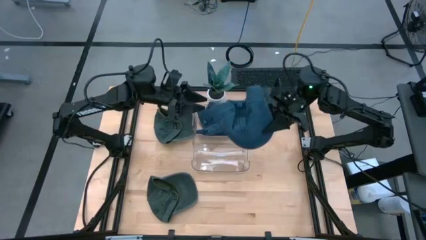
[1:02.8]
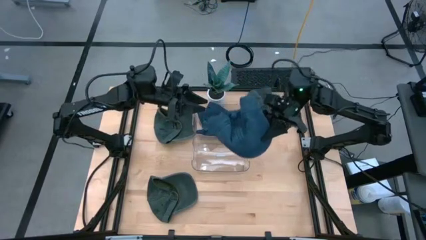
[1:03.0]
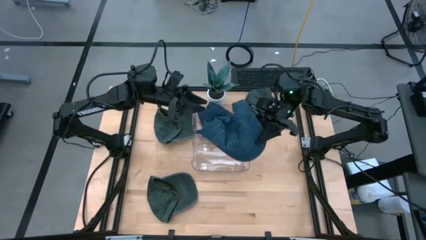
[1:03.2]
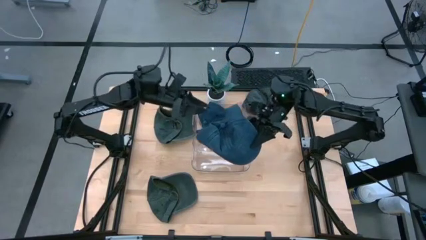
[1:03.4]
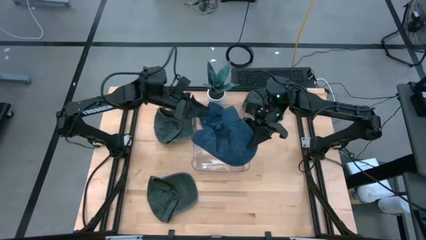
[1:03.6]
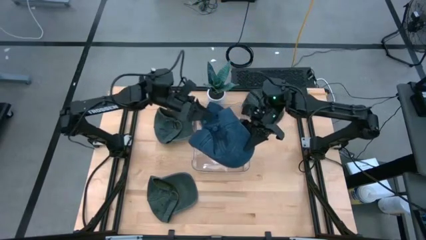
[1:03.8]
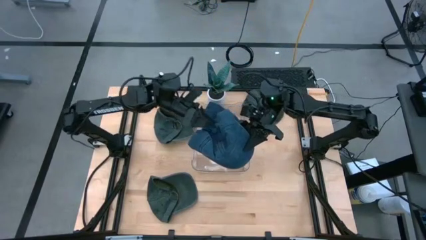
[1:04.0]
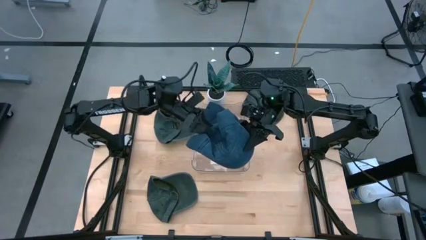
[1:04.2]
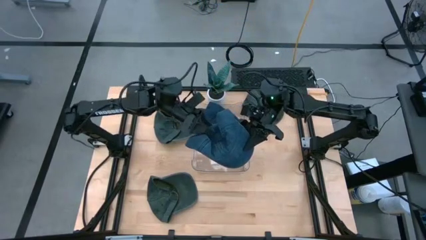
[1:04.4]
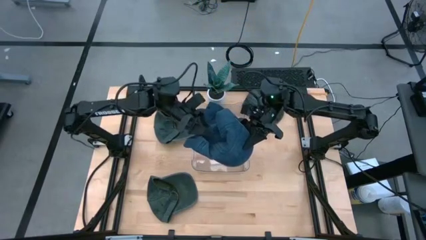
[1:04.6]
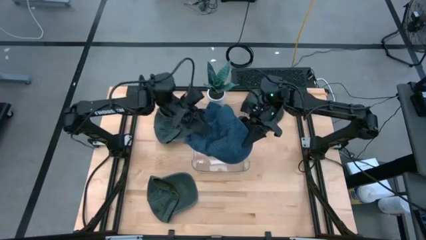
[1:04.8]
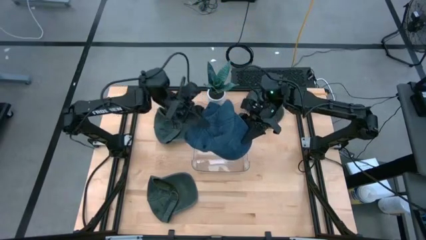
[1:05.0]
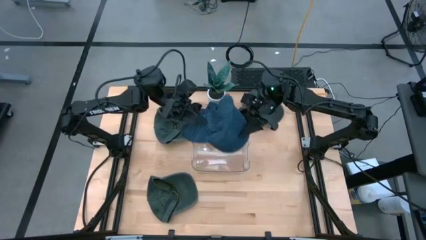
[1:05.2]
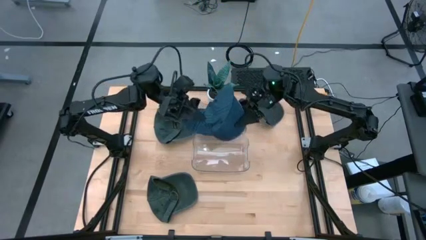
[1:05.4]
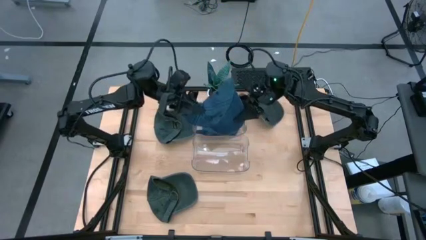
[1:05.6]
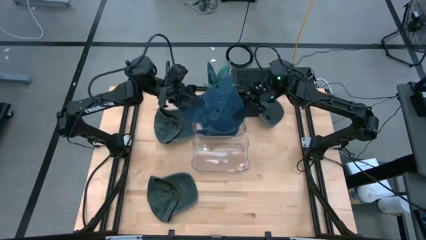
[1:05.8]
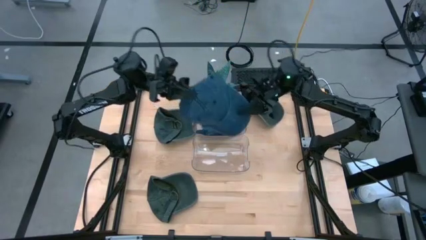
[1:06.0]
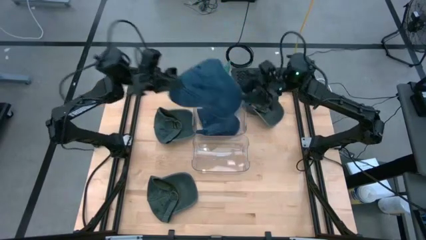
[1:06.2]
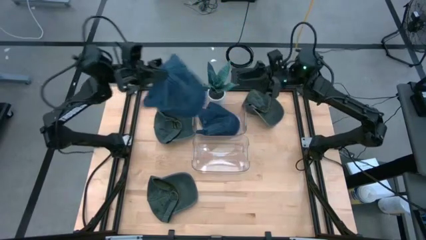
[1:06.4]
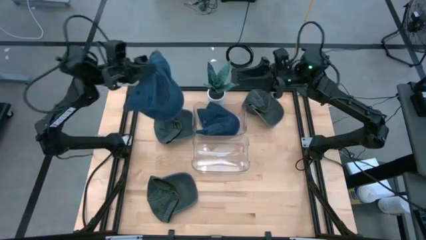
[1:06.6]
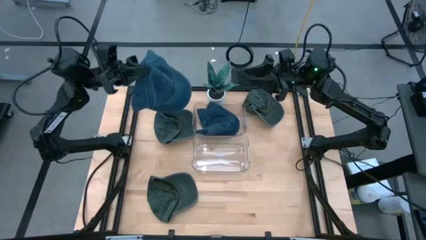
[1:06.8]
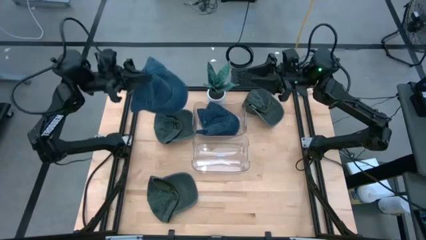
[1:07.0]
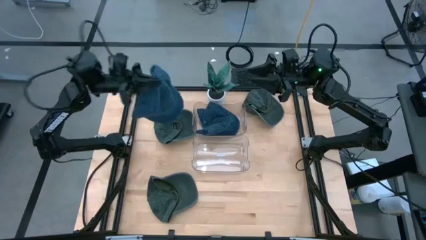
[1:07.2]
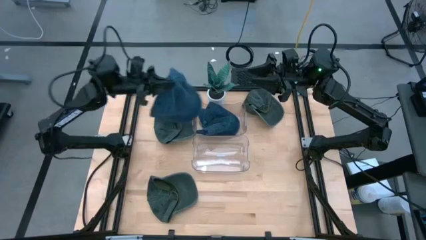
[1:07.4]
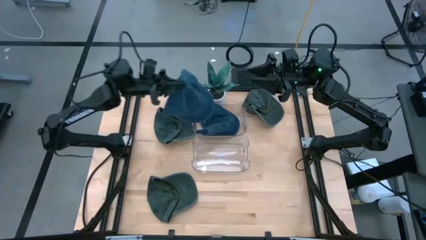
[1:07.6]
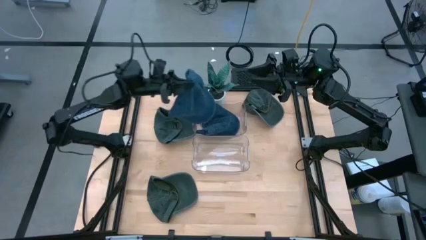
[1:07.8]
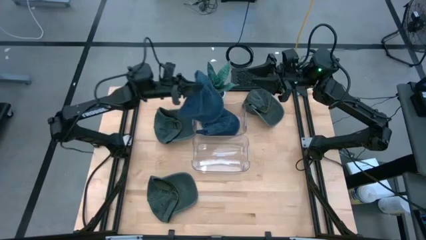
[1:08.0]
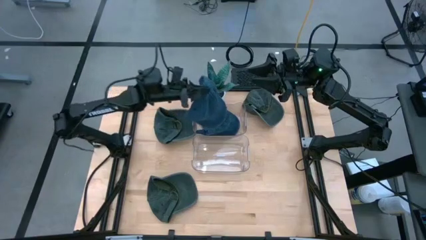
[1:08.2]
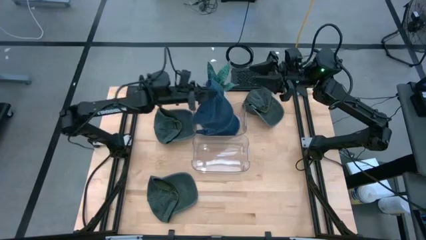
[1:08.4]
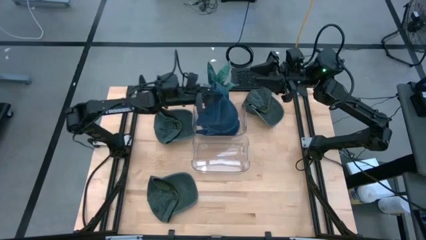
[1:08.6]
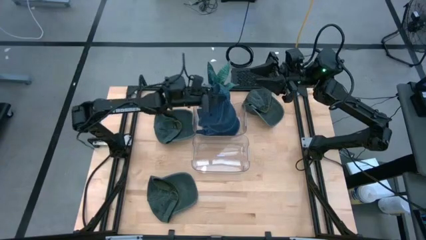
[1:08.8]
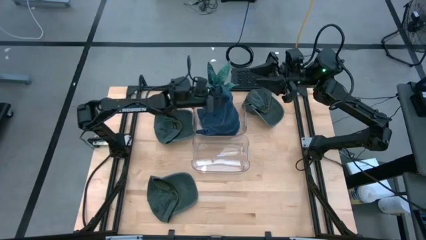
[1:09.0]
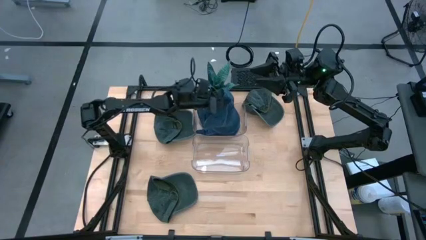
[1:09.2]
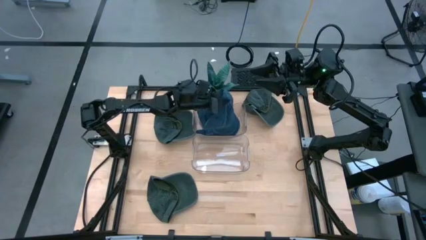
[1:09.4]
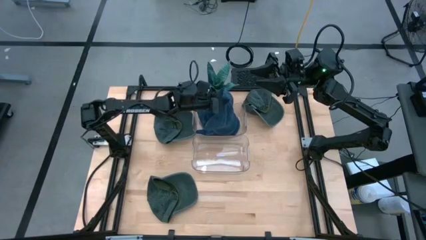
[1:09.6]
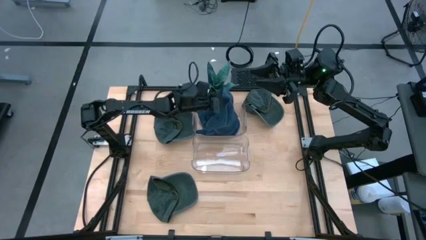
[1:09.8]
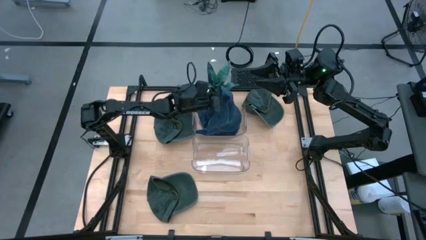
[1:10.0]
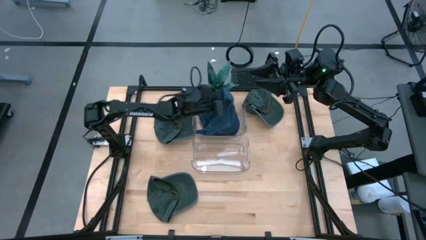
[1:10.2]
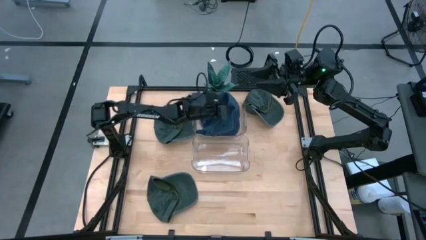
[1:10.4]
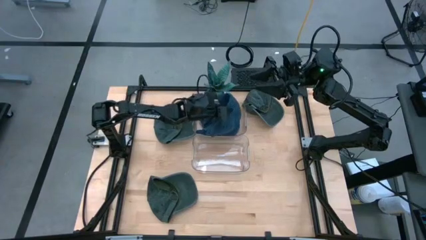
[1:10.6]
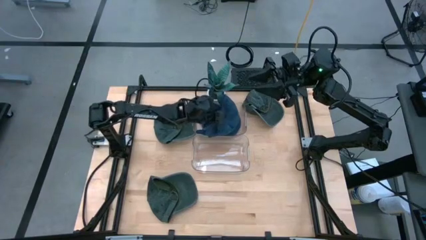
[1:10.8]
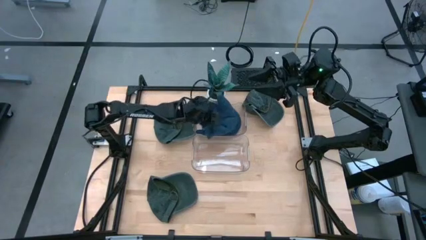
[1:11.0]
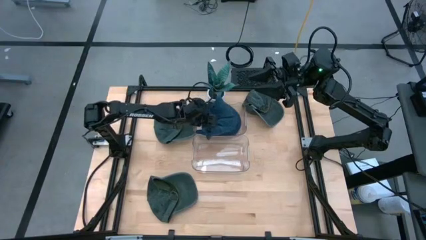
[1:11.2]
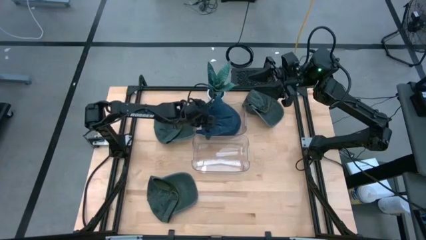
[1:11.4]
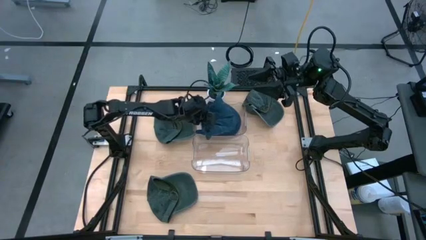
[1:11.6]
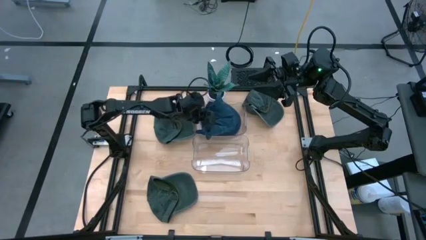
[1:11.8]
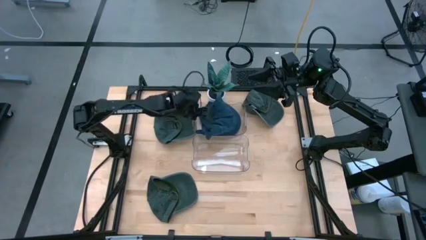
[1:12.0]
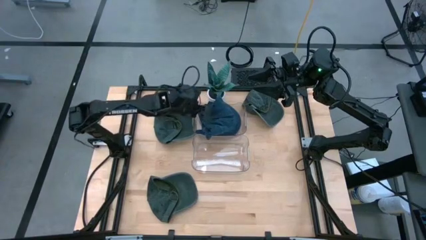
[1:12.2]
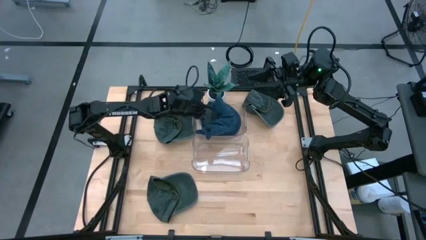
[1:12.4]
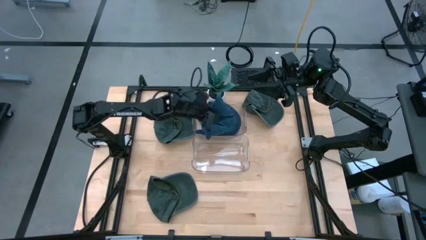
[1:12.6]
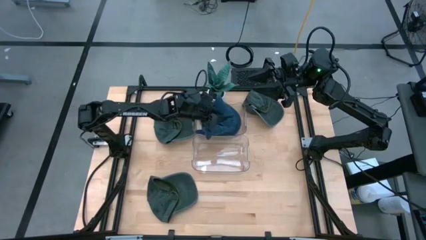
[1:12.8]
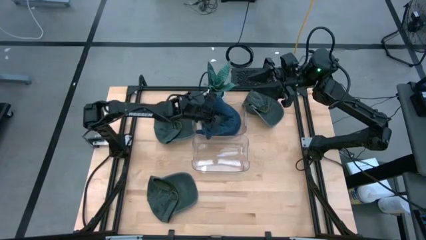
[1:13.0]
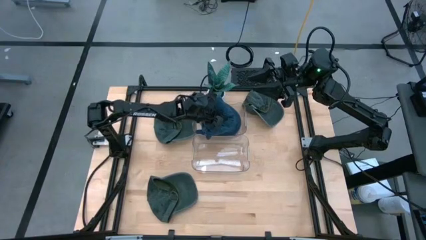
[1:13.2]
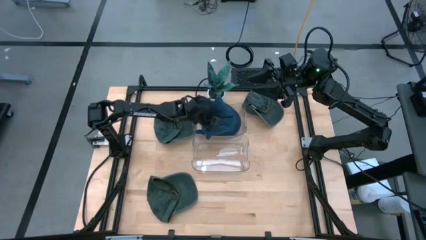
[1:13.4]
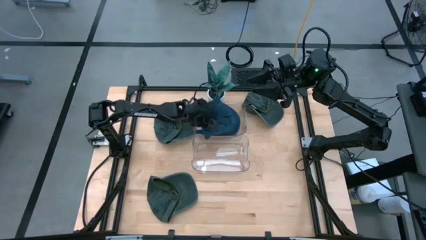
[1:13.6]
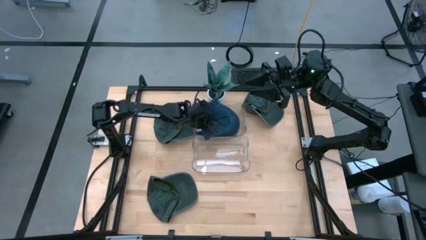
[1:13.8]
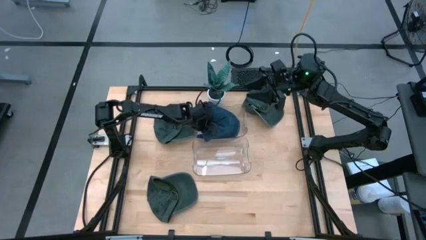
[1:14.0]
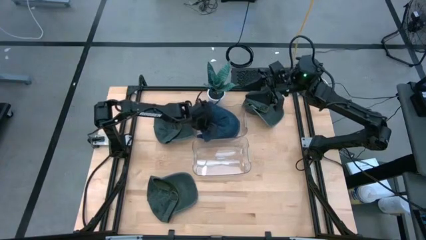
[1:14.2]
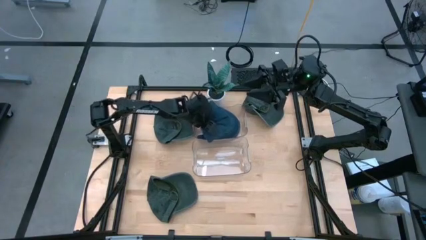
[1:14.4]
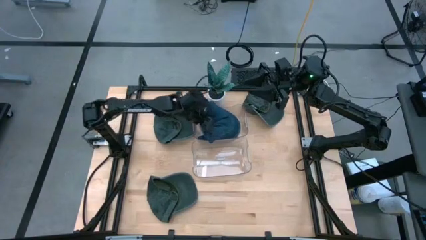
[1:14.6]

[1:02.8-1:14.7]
Task: Pick & Place hat
Put the blue cap into the top transparent bin

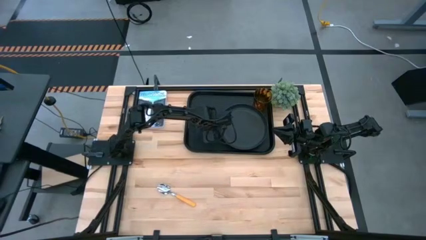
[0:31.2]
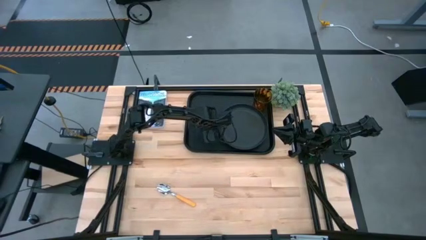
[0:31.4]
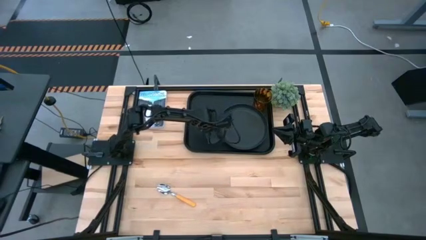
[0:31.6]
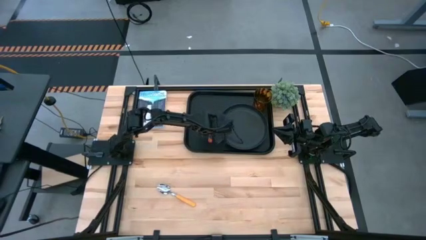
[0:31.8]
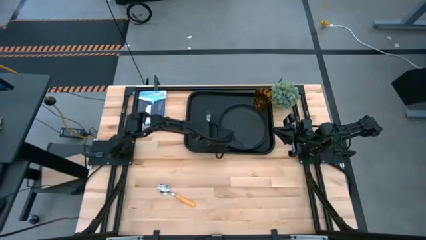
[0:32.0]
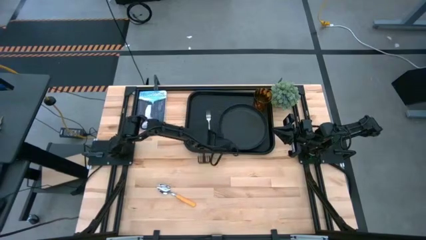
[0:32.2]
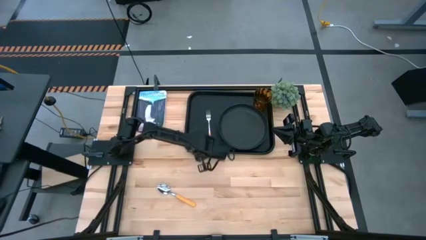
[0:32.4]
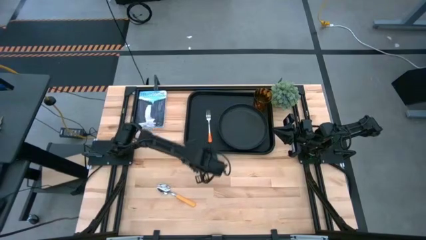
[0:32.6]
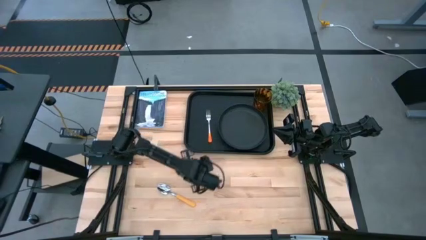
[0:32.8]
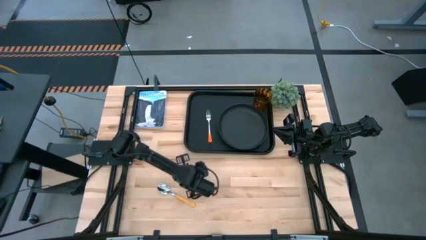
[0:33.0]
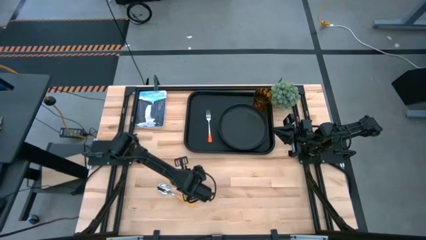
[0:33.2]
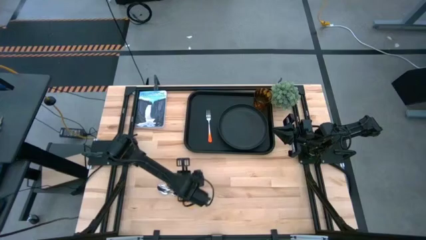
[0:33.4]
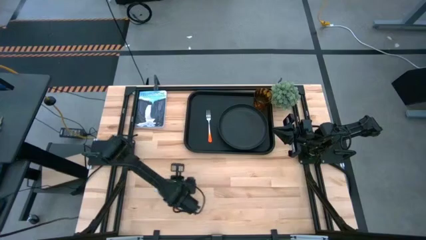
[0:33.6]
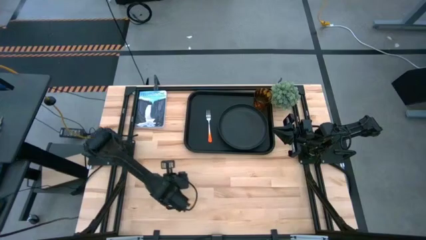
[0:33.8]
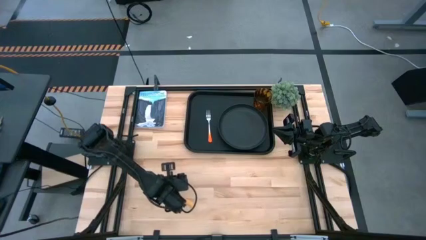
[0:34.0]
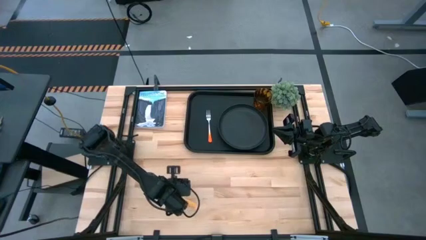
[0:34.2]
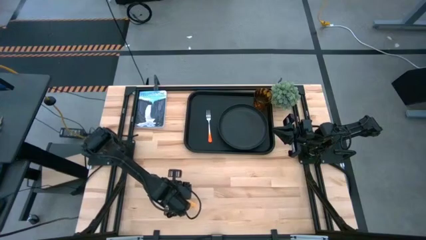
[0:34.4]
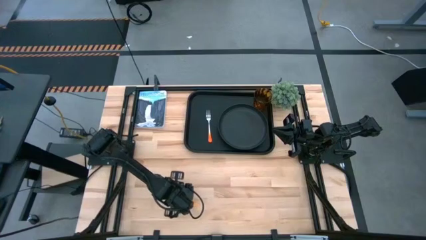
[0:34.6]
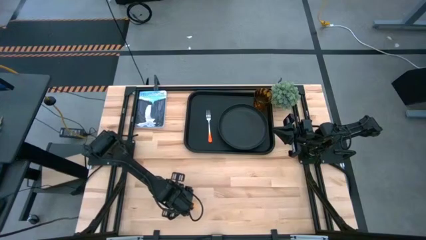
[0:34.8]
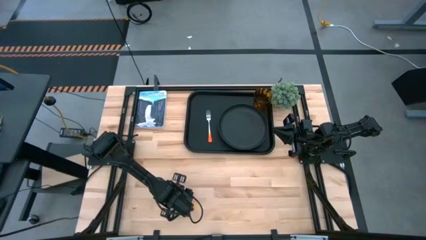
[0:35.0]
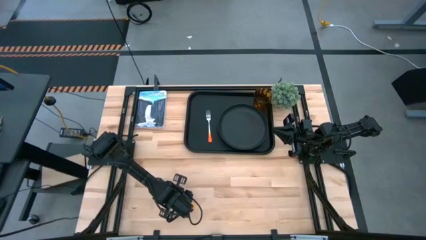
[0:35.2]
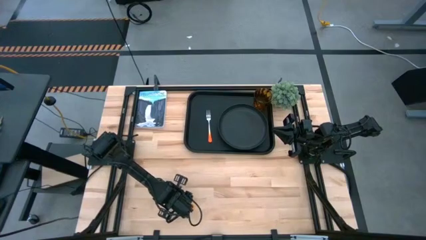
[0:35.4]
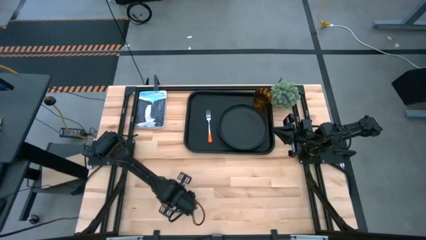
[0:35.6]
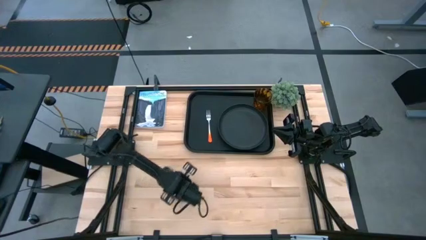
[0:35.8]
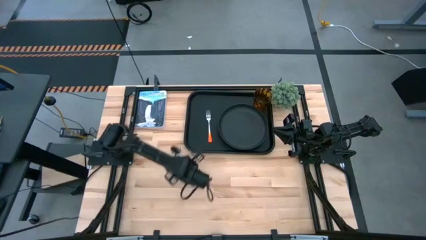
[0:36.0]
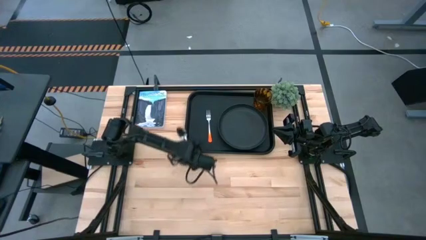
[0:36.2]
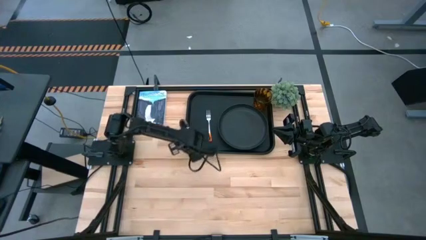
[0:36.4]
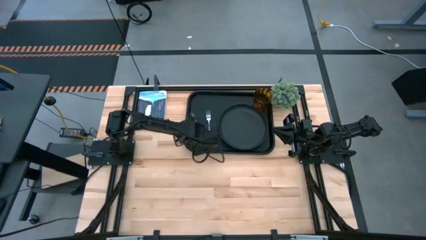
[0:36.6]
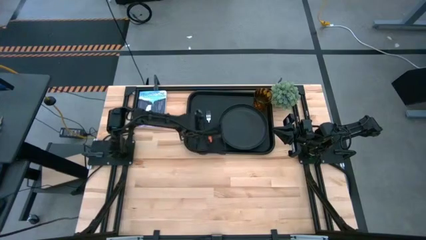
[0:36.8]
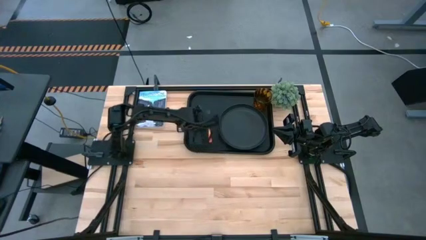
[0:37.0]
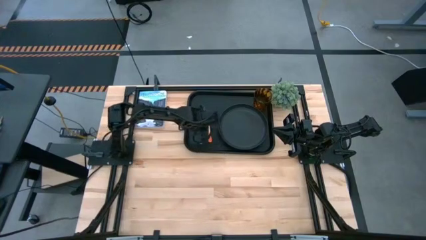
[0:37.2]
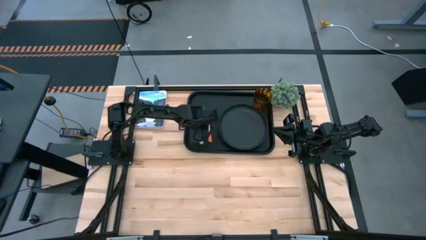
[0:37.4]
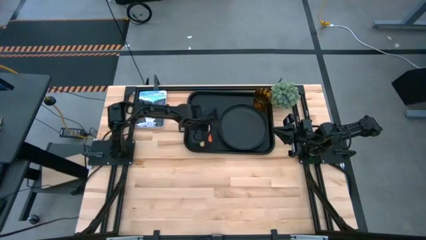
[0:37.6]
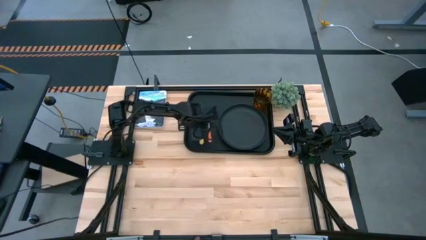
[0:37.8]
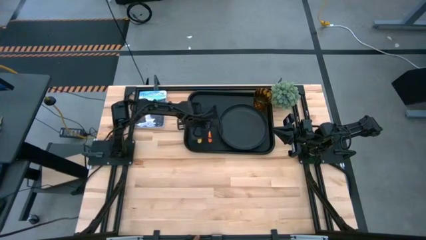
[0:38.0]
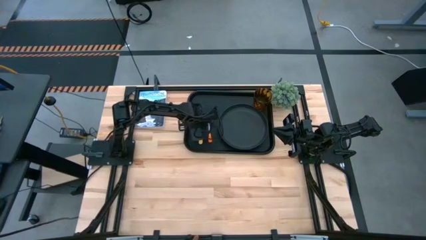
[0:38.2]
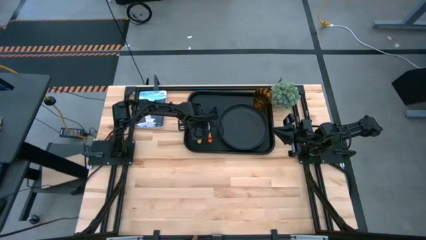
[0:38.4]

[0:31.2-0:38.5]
Task: Pick and place plate/cup/fork/spoon on tray
Put the yellow spoon on the black tray to the left of the orange fork
